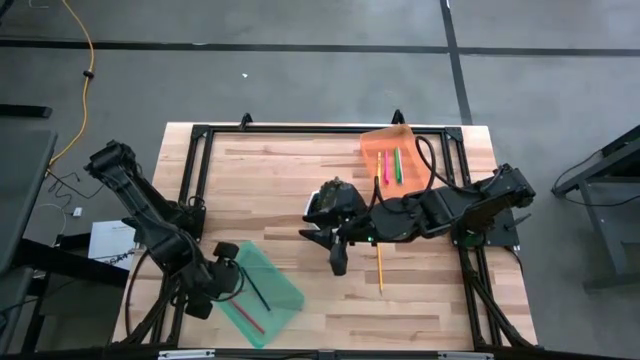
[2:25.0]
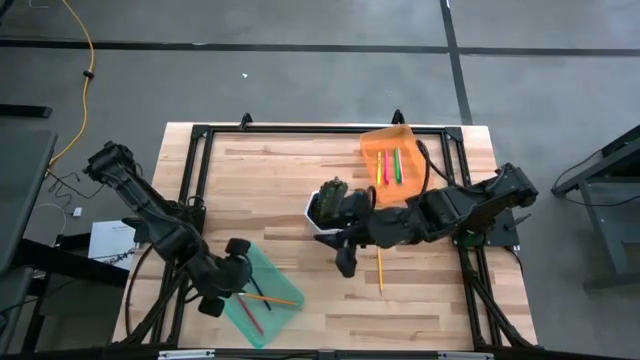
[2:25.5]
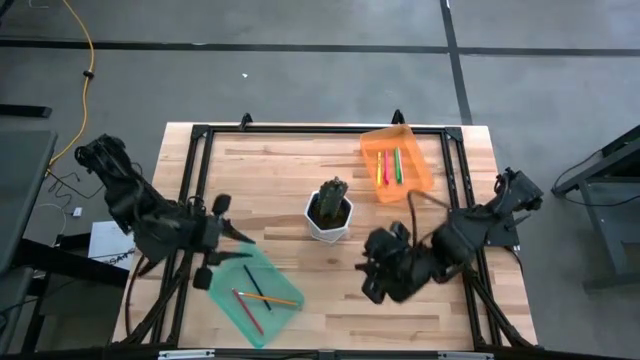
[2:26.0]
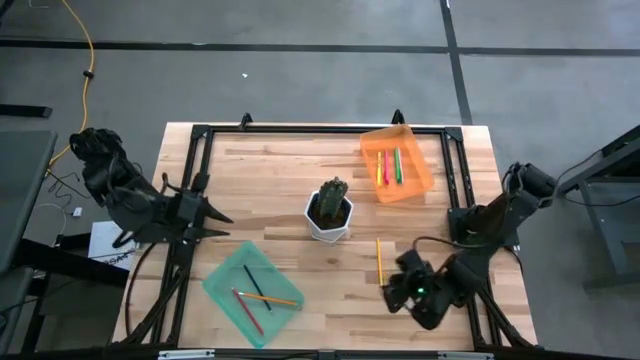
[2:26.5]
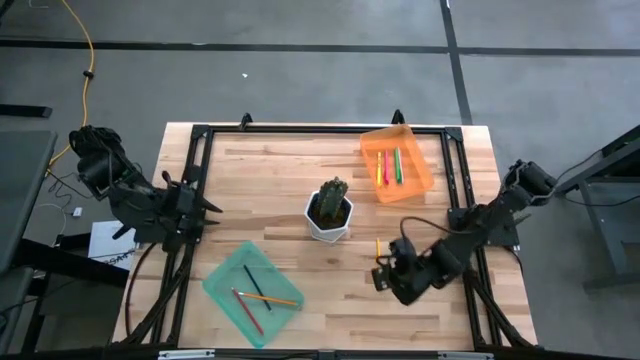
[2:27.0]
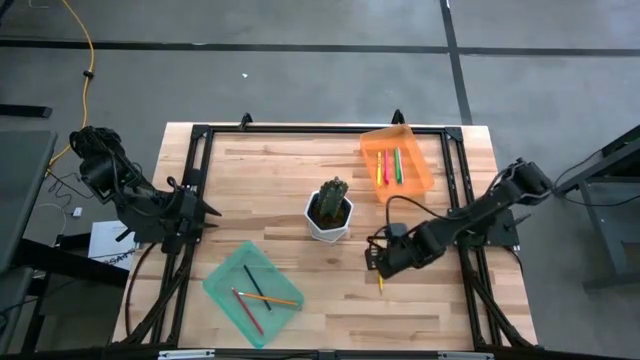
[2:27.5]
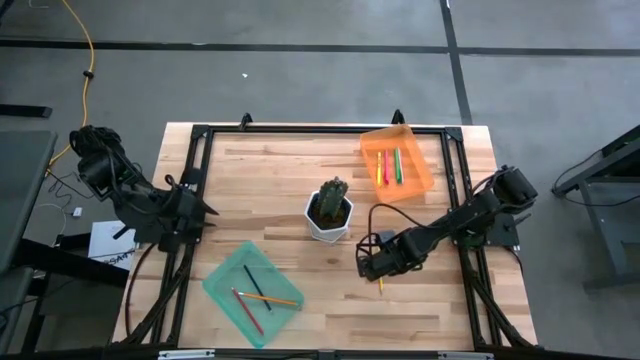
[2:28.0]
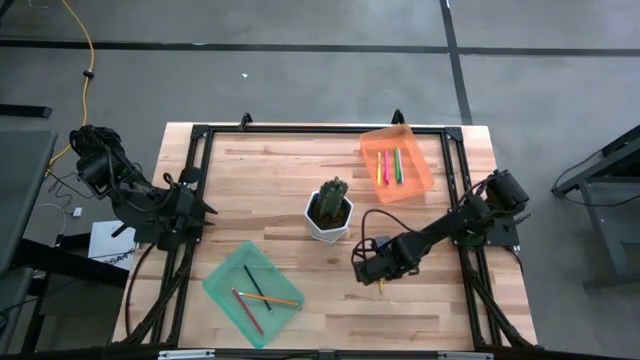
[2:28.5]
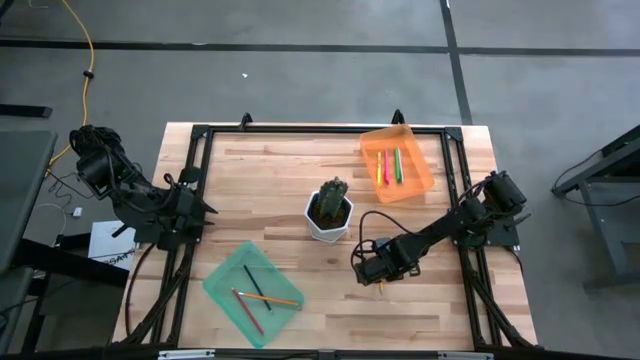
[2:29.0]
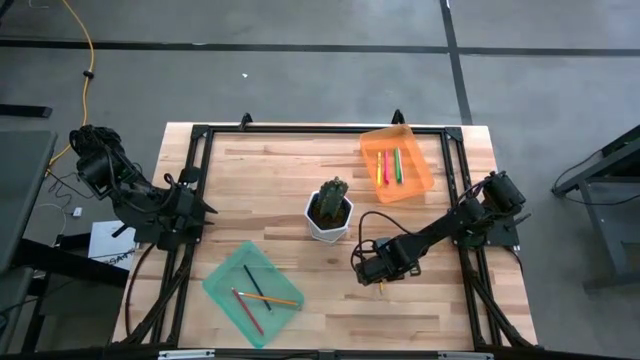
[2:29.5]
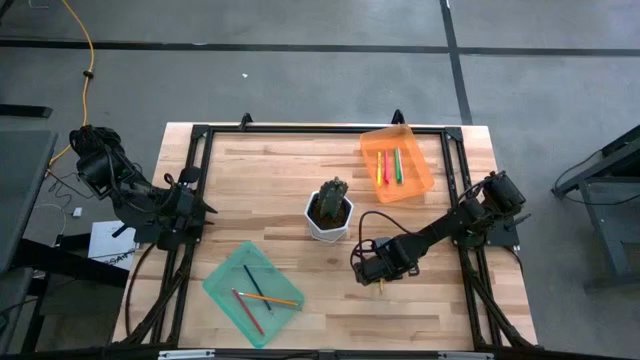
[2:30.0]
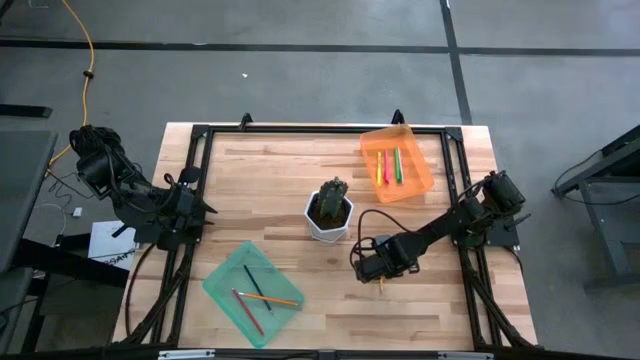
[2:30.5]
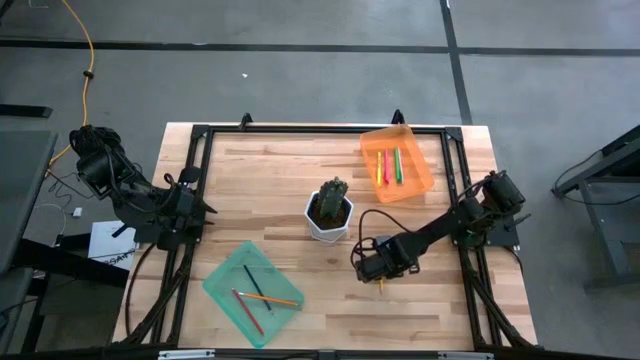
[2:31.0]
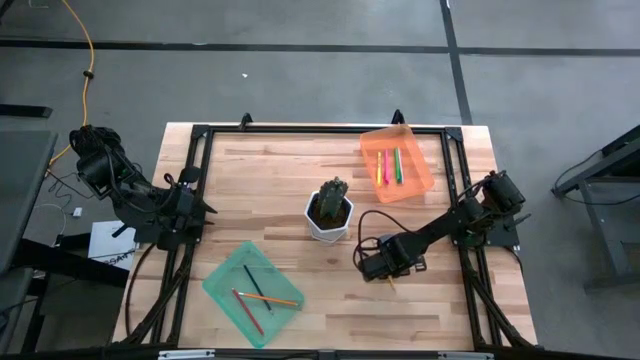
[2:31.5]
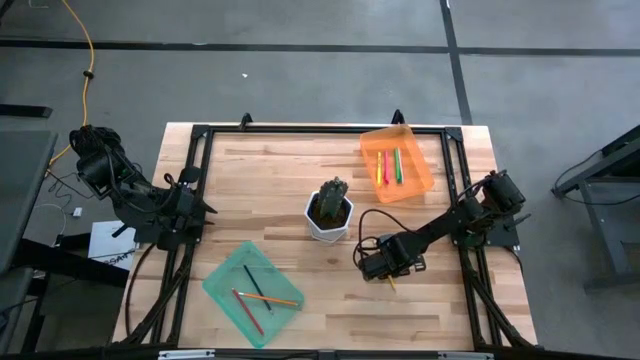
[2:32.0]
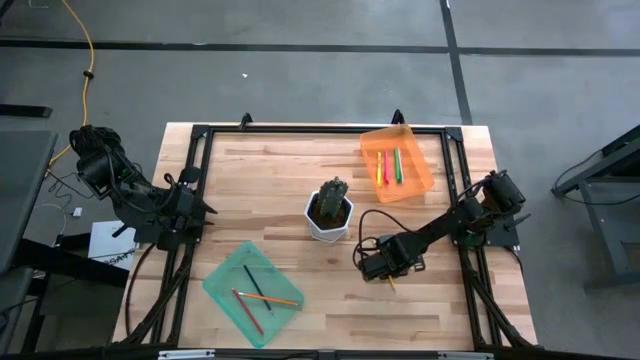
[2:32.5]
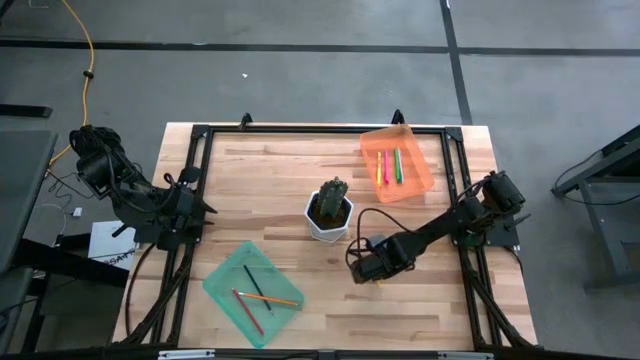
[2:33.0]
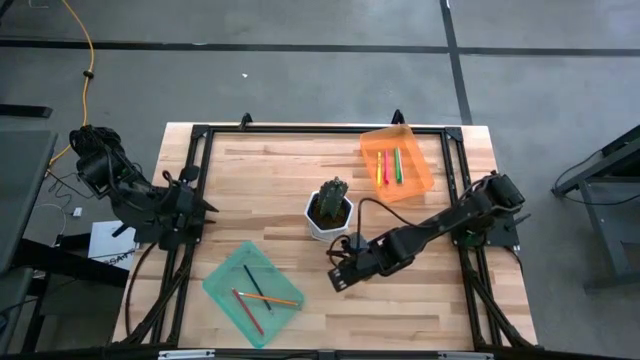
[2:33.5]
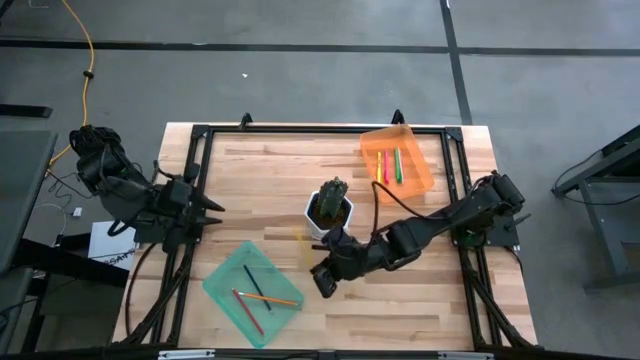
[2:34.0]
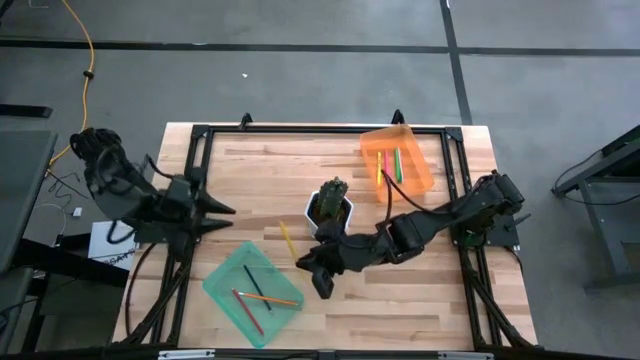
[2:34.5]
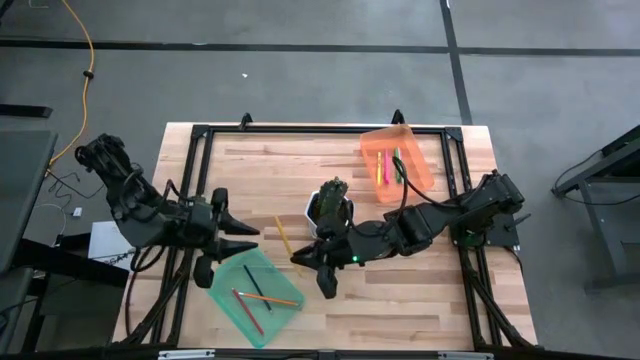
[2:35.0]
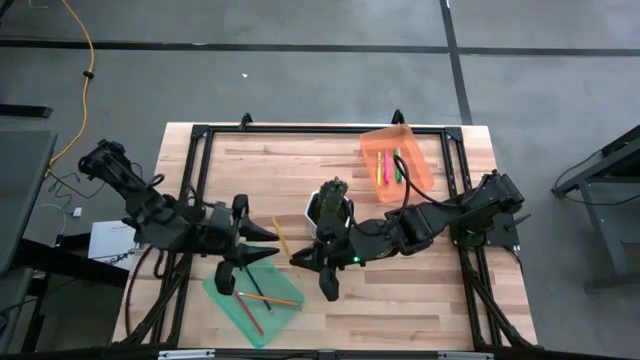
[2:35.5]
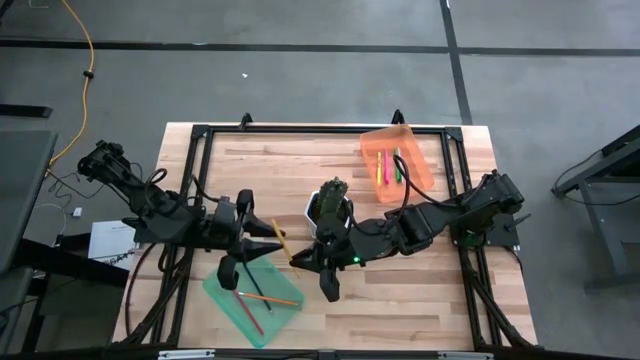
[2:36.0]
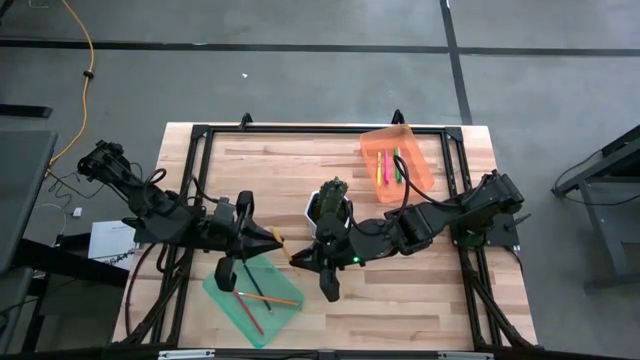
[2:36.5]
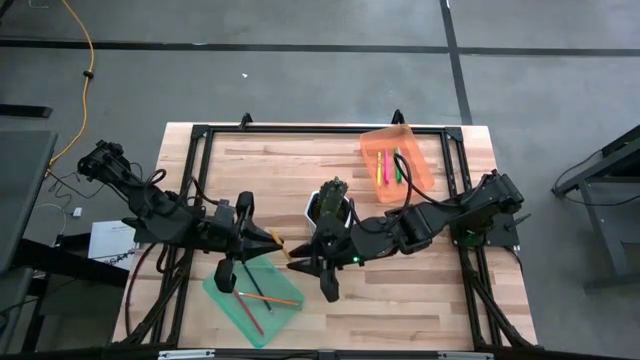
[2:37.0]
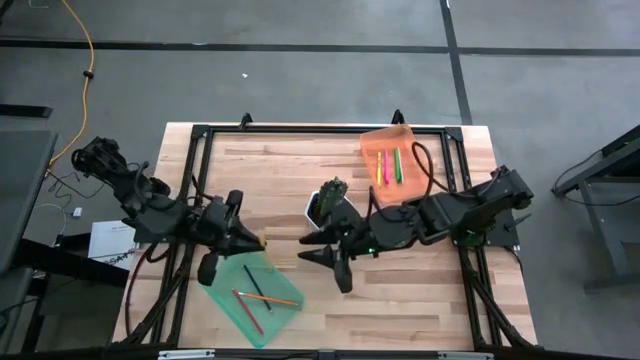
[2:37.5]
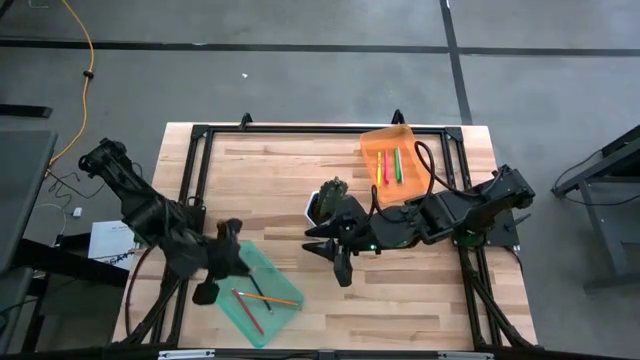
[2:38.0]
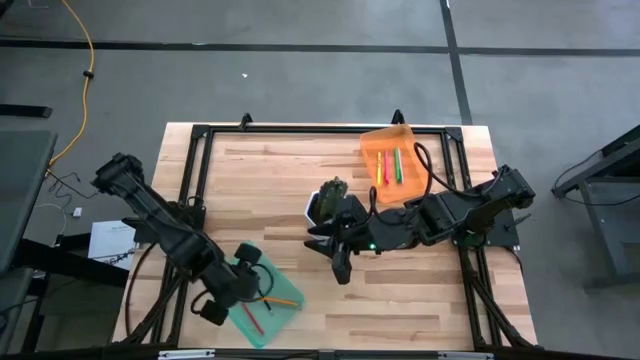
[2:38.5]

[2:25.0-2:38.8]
Task: Sort pens & pencils
Put the yellow pencil into the green bin

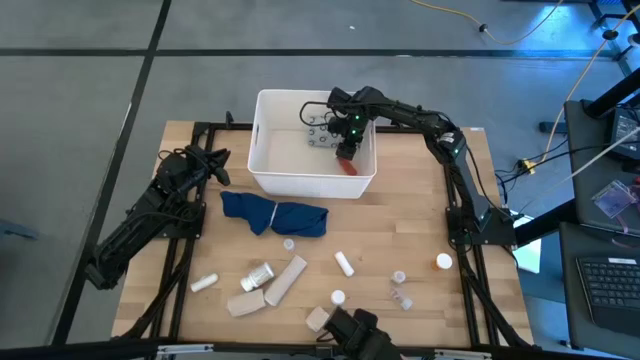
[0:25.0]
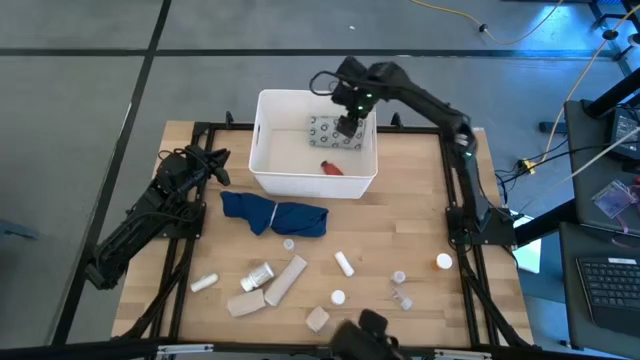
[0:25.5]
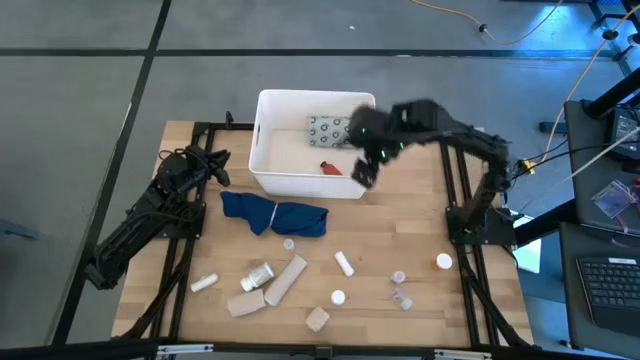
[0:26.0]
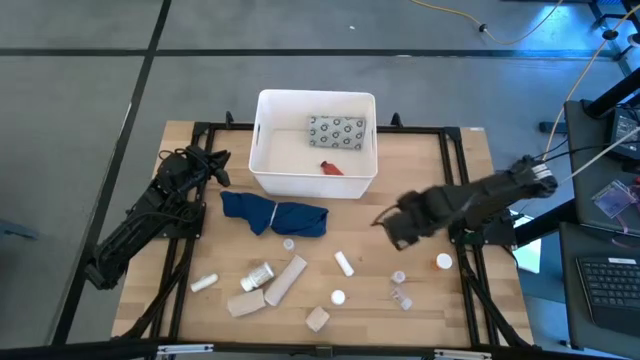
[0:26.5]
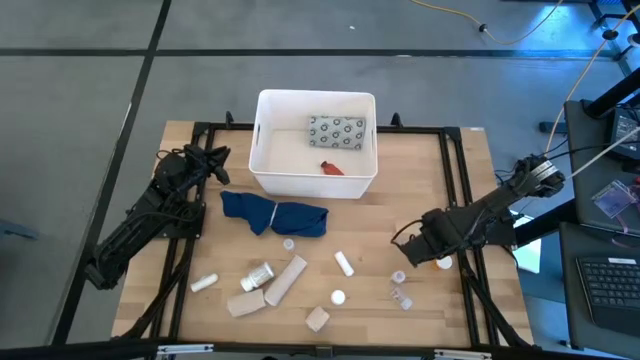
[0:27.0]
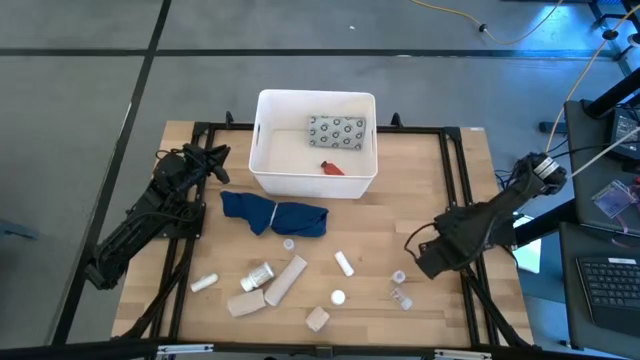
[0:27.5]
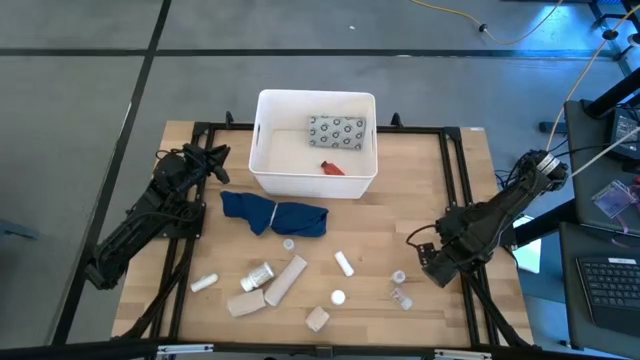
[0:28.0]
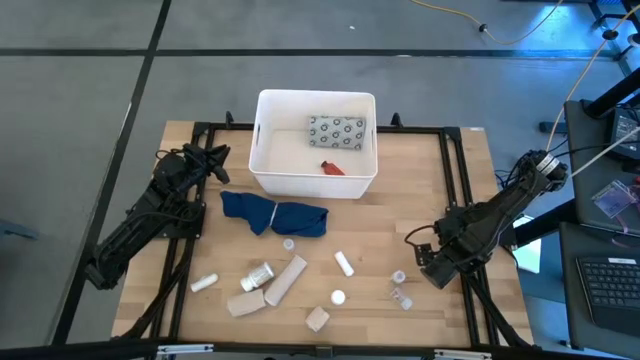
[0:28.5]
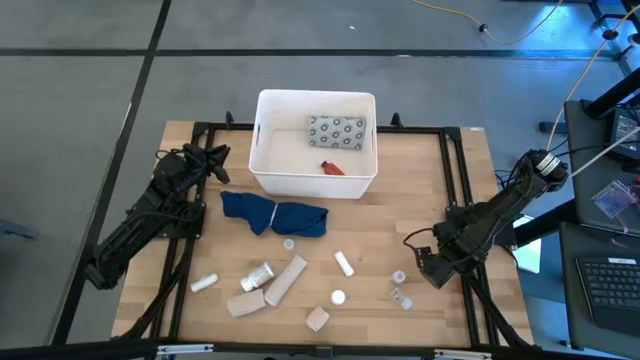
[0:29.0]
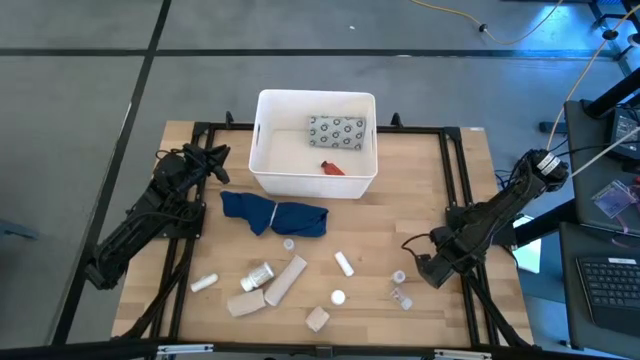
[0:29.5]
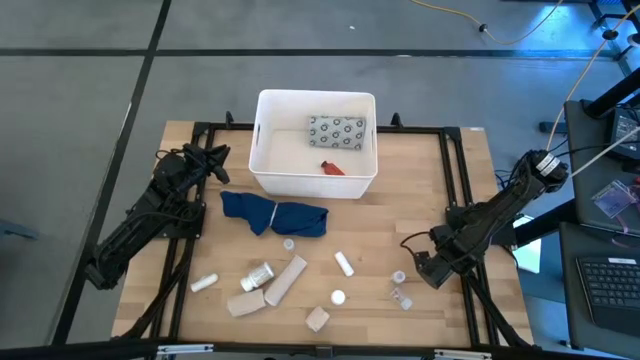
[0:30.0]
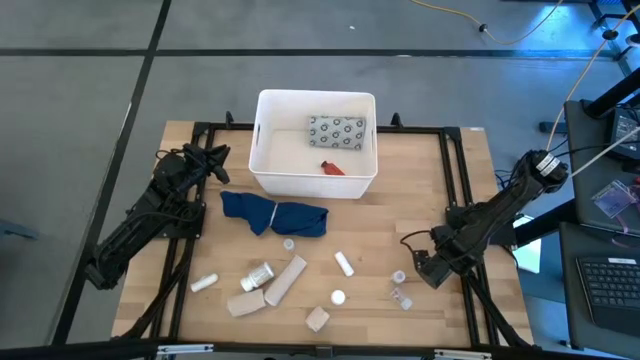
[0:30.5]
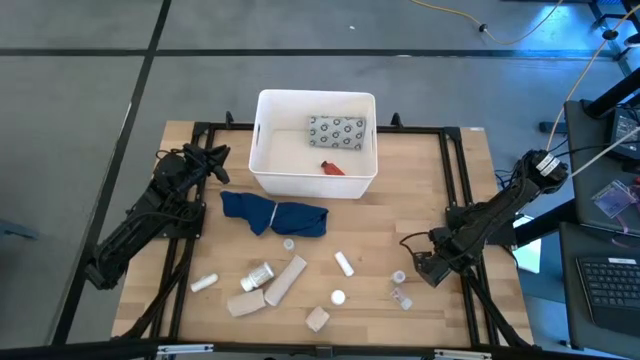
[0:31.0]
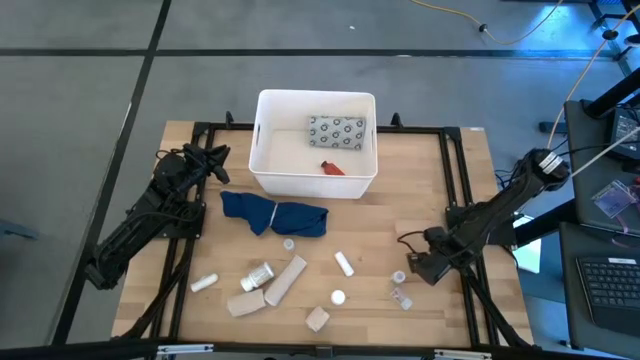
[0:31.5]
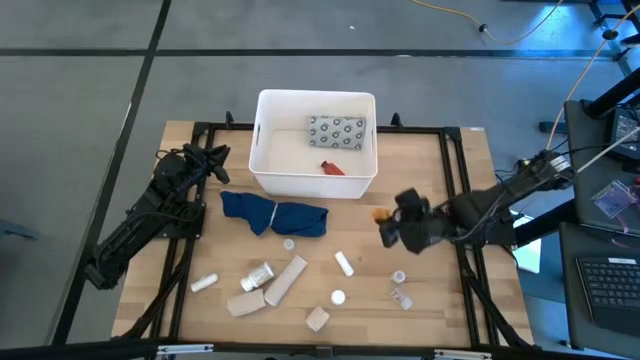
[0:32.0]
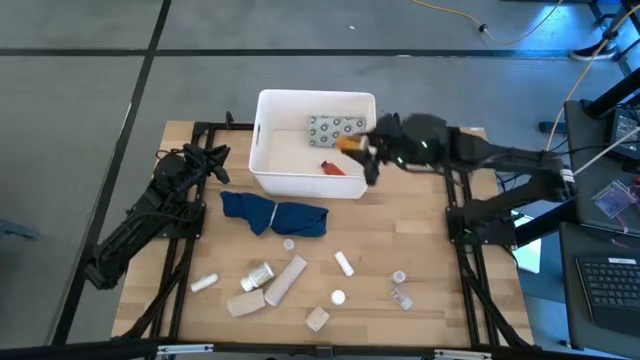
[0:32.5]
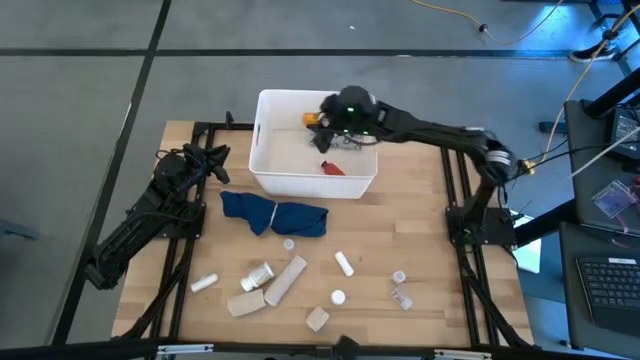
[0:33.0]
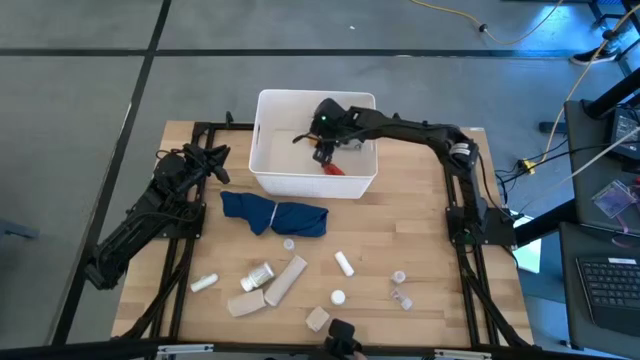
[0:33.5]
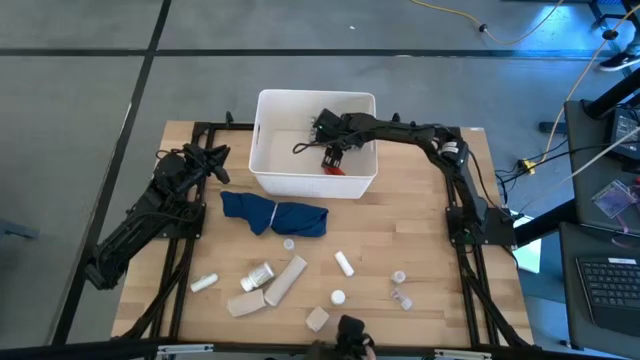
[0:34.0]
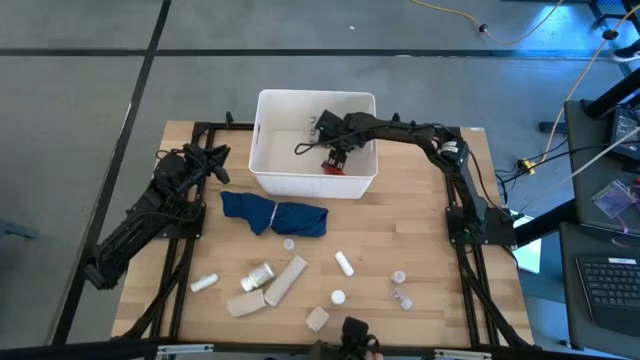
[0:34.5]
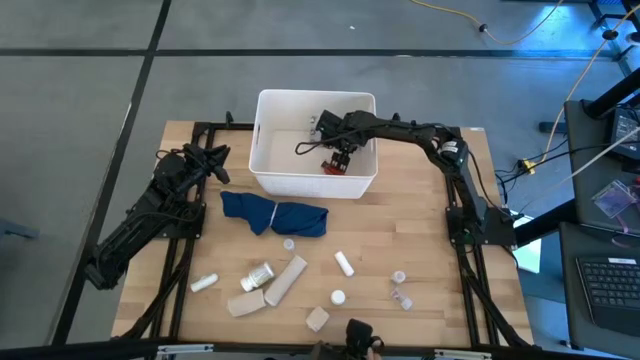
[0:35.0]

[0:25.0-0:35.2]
Task: Pick & place medical supplies in basket/bin
Put the orange pill bottle into the white bin
